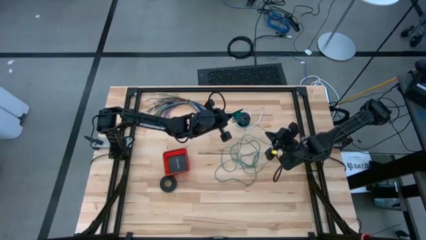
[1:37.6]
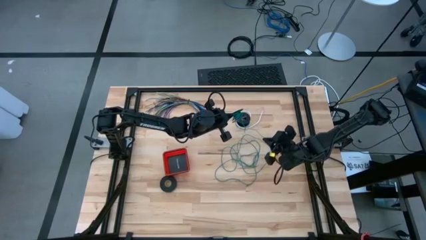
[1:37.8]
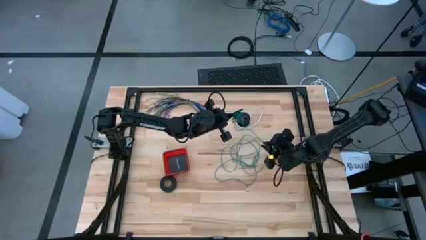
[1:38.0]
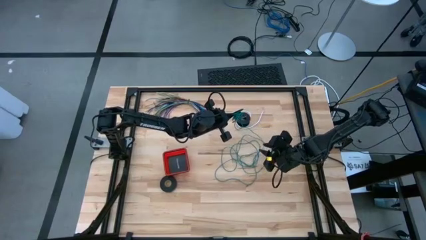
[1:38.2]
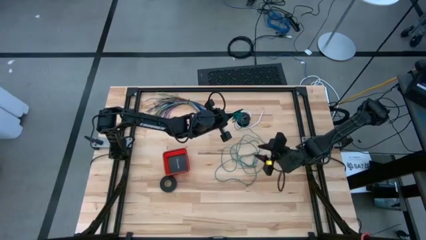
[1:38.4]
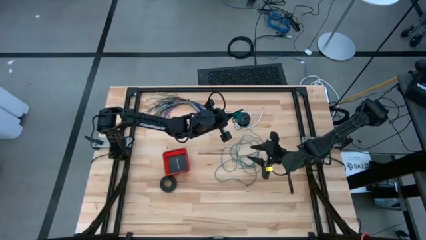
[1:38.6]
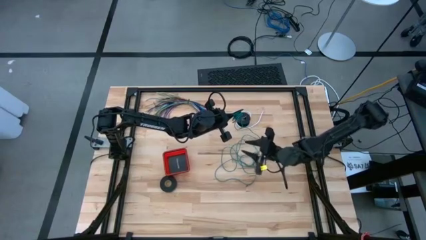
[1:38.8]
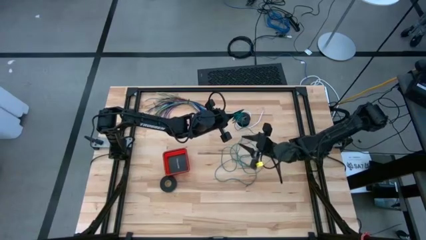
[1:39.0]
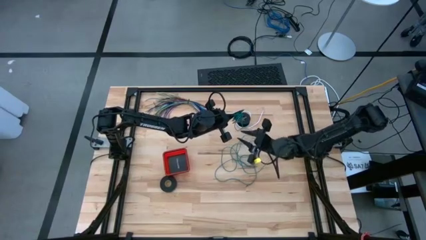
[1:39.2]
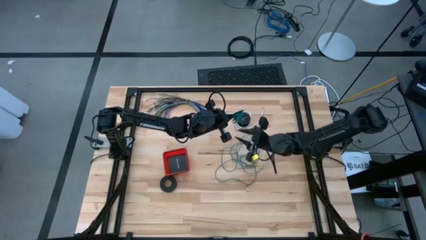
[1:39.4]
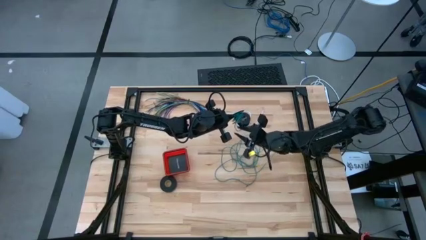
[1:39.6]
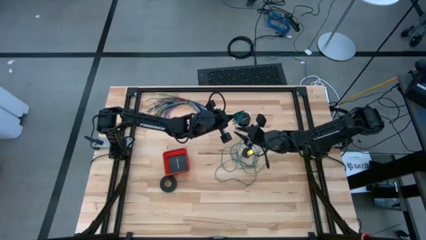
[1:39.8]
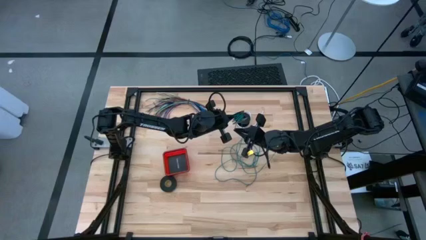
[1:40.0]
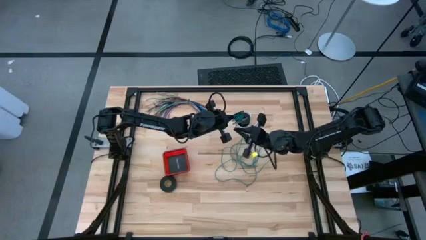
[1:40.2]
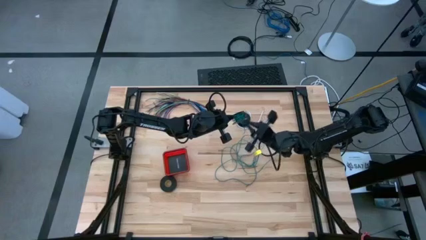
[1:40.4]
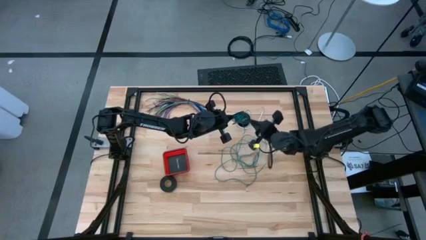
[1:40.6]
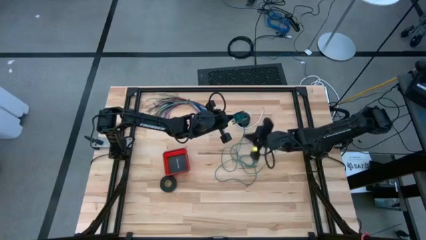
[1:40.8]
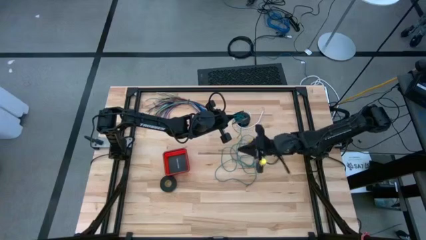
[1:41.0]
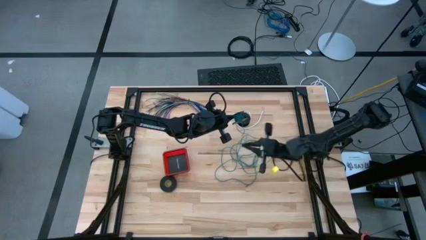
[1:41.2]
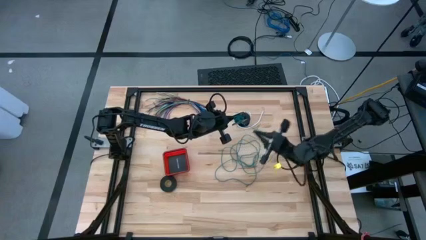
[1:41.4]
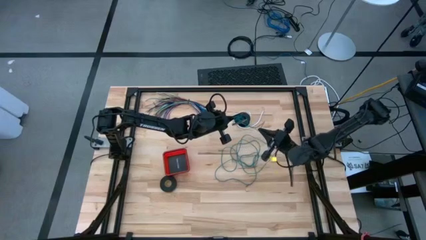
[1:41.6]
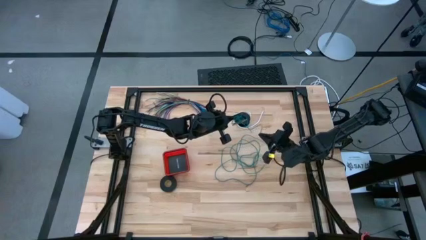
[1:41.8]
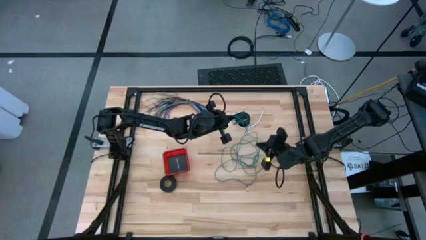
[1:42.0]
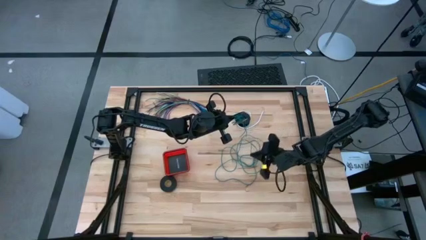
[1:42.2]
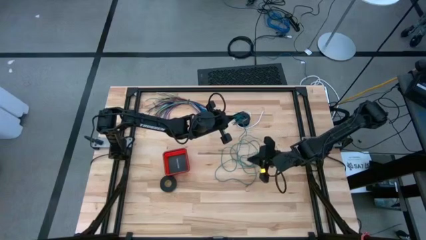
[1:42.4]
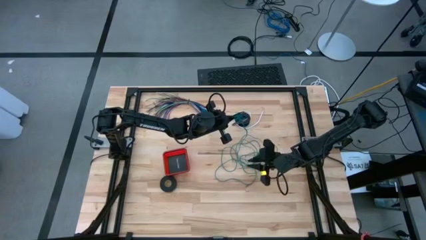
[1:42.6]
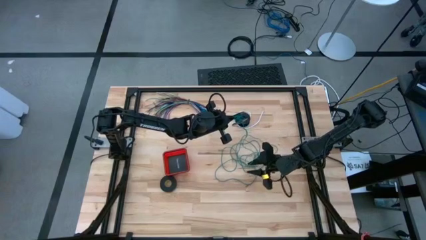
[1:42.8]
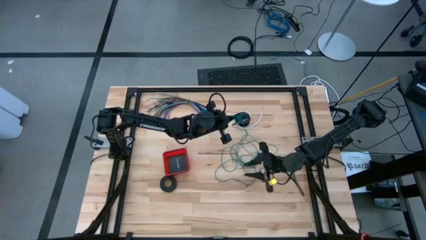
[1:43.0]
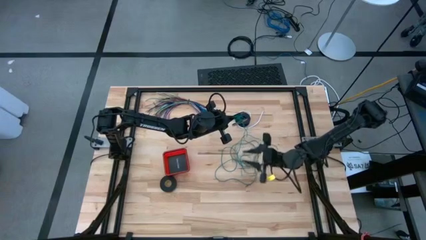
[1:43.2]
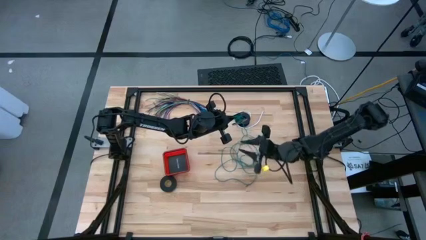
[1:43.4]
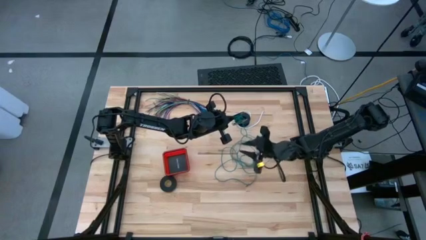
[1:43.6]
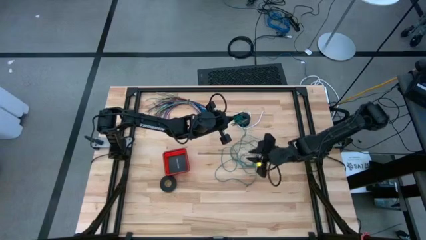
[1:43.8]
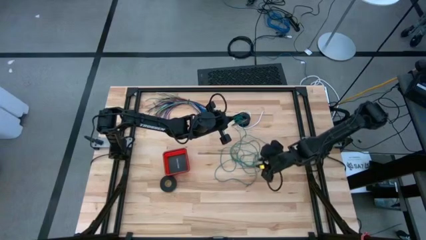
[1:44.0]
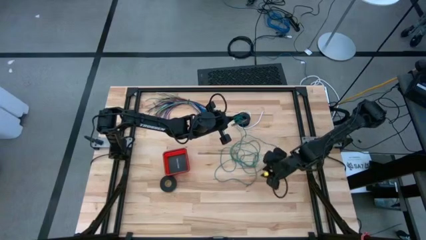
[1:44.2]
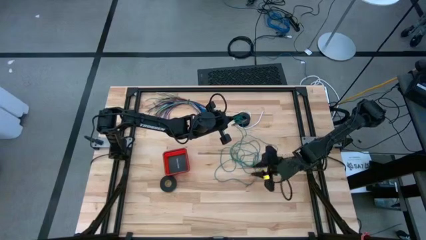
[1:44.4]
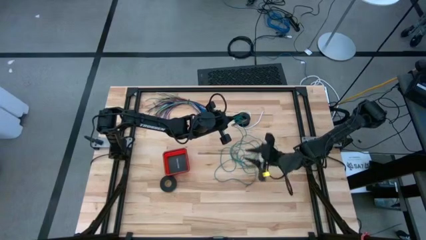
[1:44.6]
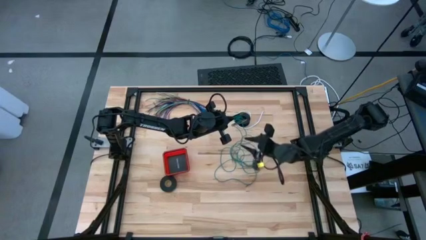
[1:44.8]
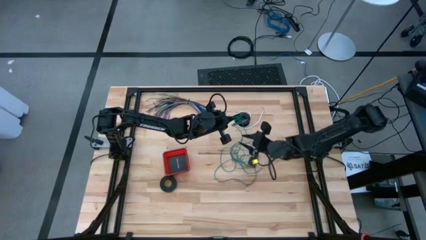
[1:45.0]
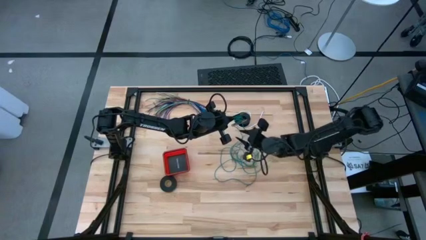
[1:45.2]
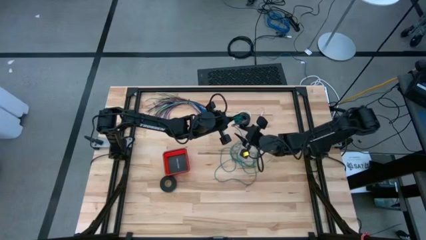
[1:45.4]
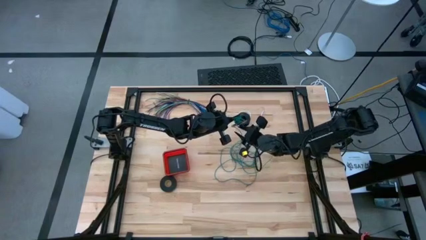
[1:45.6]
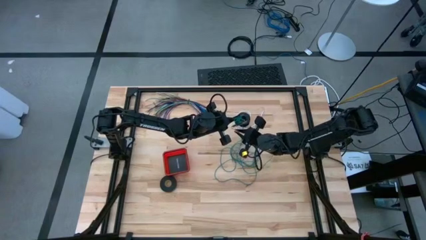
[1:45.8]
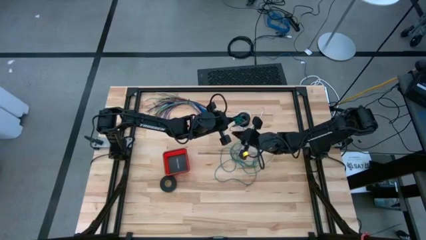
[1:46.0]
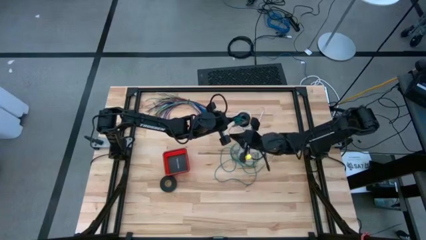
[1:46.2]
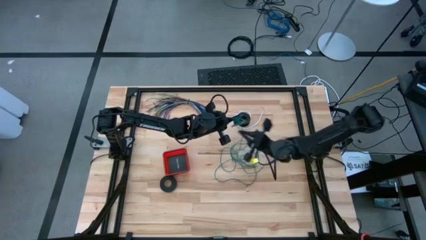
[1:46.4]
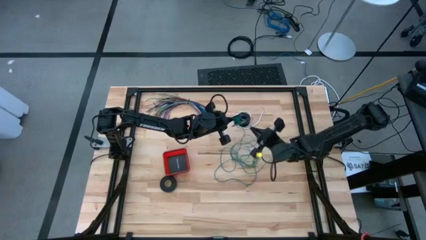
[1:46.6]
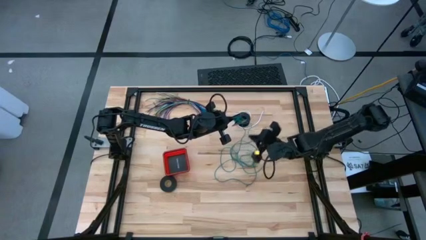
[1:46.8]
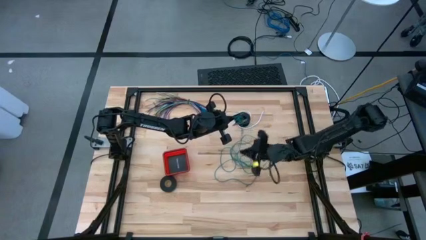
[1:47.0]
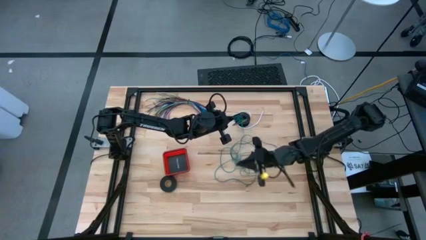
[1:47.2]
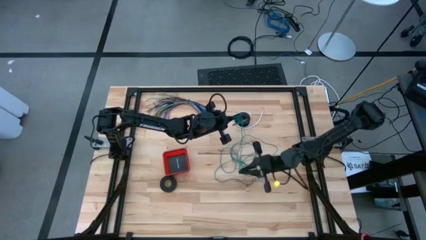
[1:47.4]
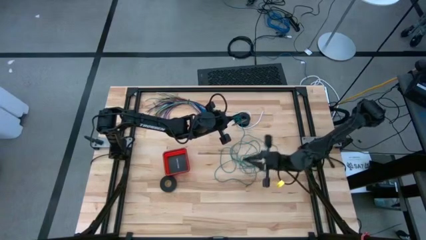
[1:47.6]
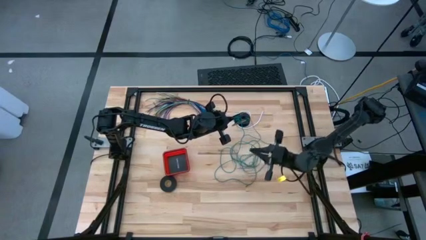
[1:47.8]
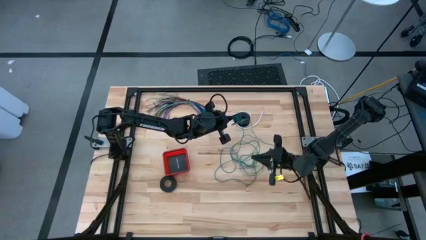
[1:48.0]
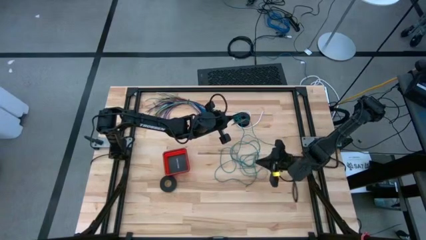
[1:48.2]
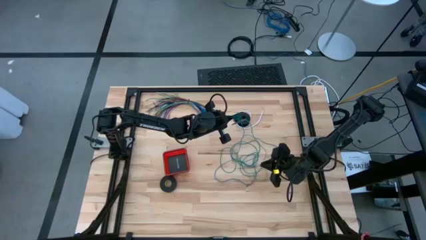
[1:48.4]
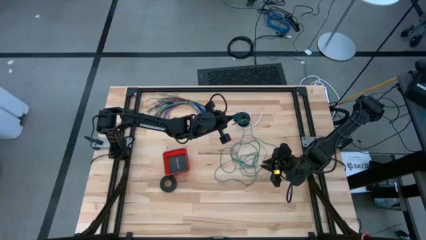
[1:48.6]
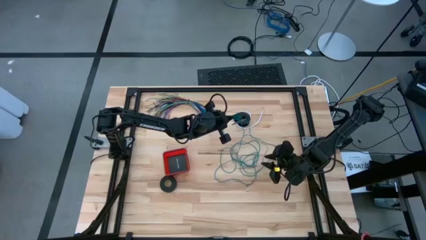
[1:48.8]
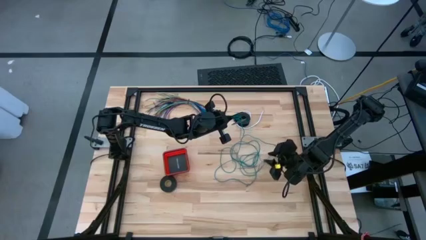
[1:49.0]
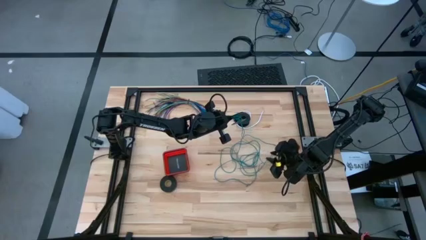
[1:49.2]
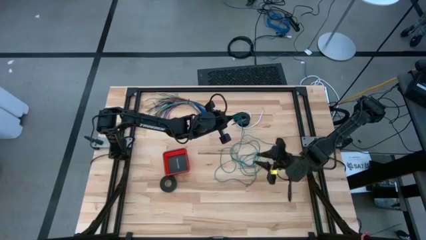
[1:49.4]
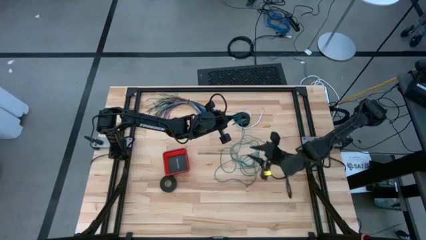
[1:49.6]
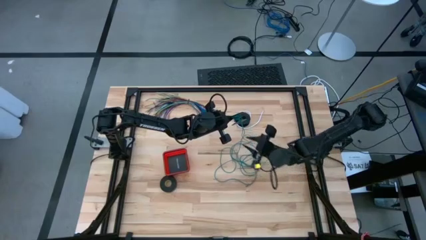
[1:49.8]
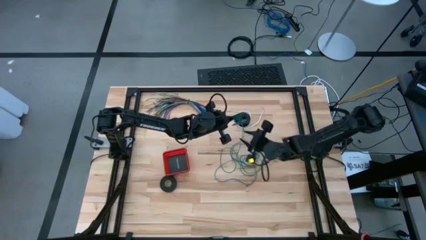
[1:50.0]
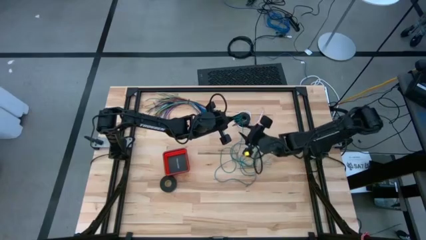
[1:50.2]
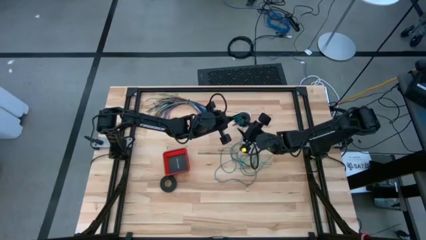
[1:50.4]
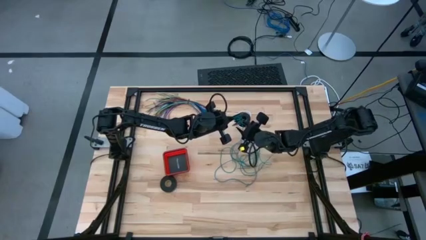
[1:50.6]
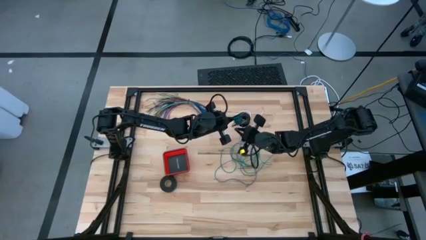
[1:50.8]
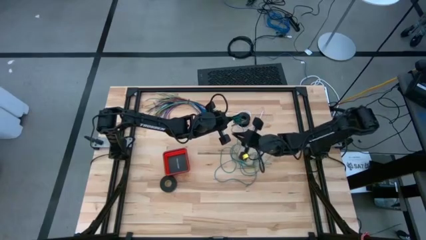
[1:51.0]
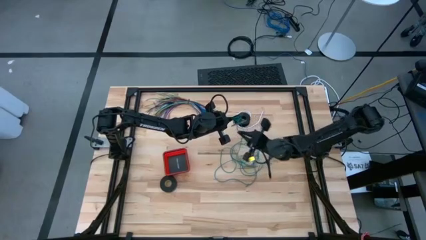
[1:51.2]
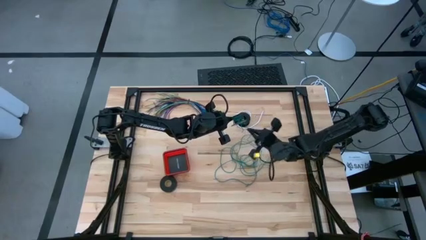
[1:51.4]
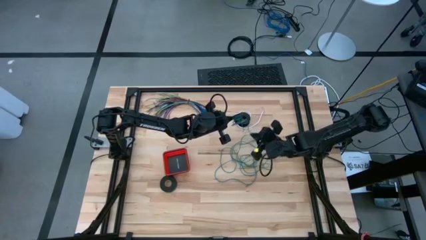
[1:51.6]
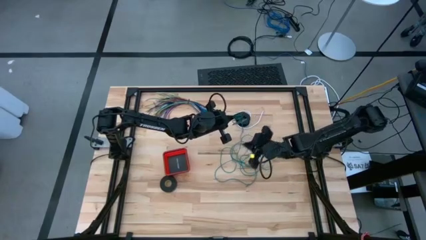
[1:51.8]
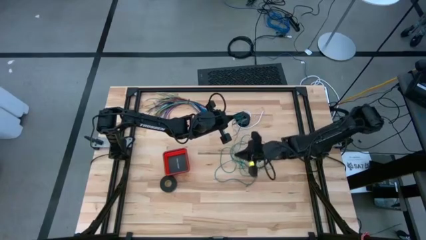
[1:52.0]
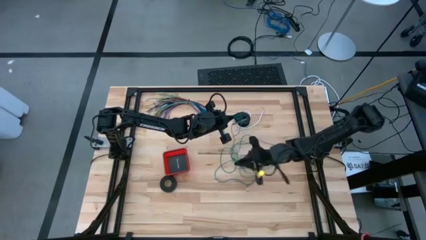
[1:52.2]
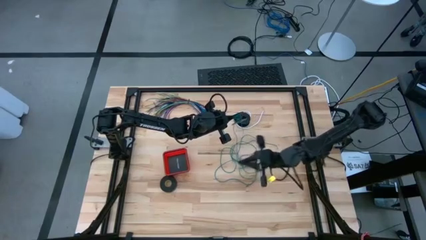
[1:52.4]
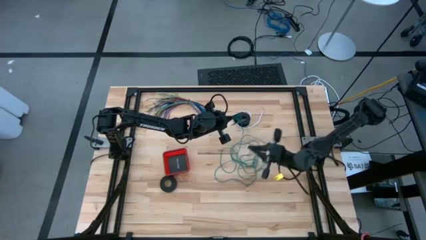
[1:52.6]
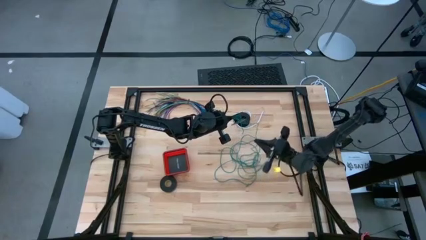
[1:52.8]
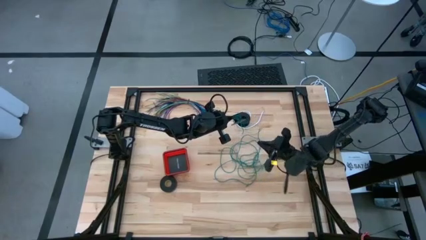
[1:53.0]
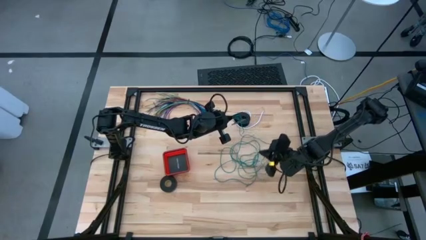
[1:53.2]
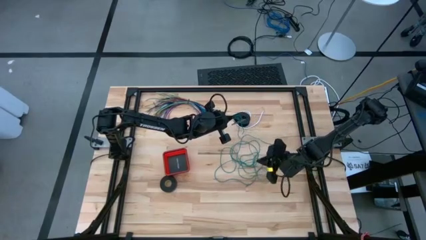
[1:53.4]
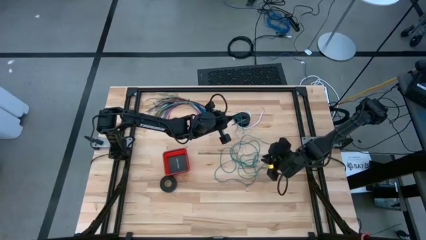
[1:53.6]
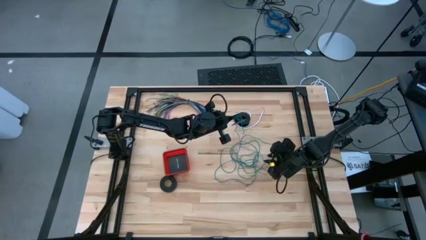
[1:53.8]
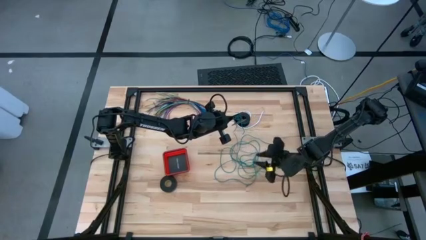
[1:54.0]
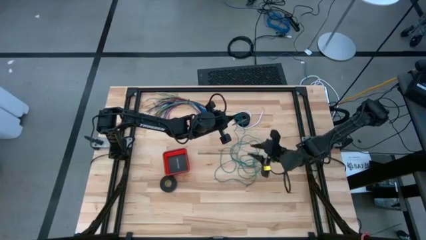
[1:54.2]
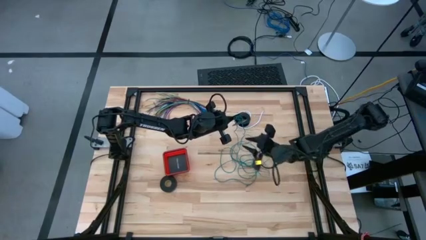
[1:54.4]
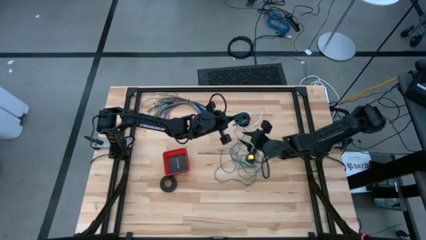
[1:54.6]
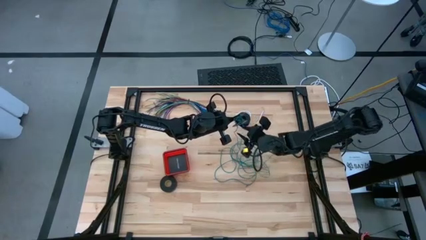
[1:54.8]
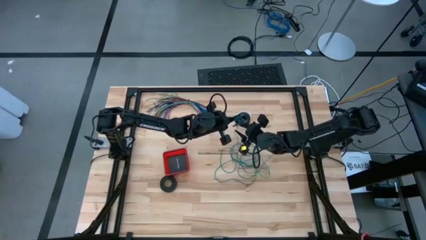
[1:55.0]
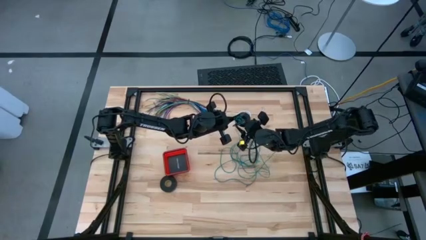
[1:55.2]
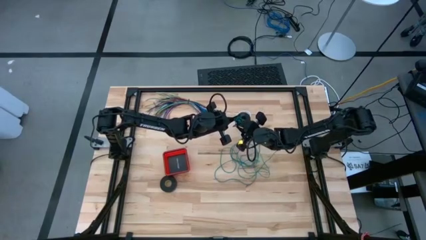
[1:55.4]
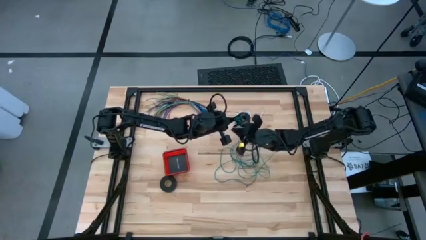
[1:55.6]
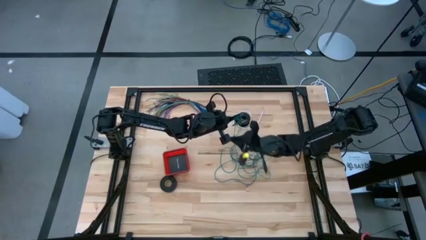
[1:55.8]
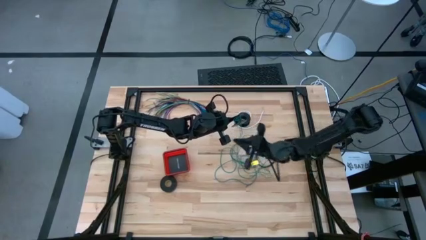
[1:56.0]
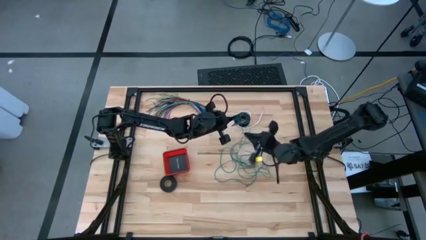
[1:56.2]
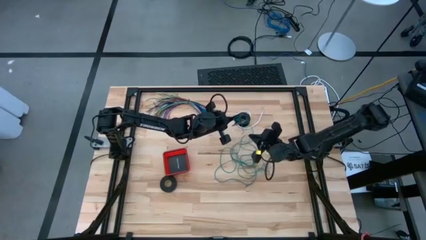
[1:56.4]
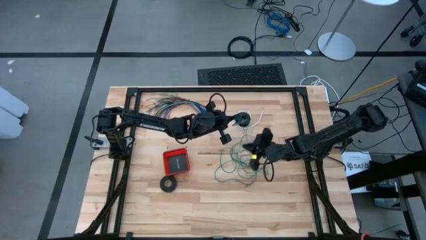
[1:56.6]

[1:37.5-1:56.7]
Task: Coil cords
Uncoil the green wire from the spool
